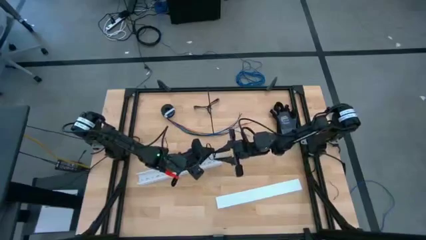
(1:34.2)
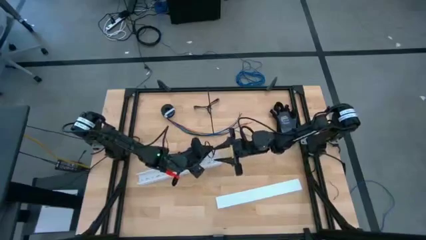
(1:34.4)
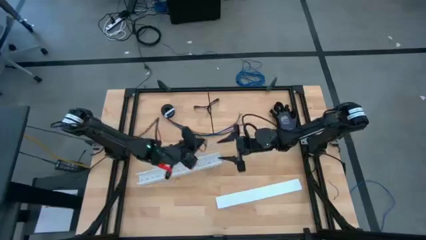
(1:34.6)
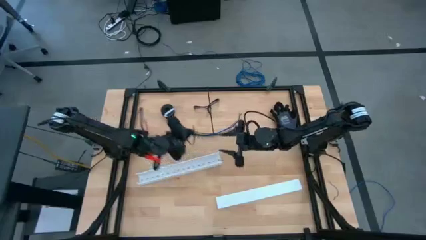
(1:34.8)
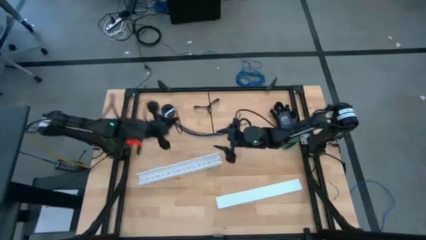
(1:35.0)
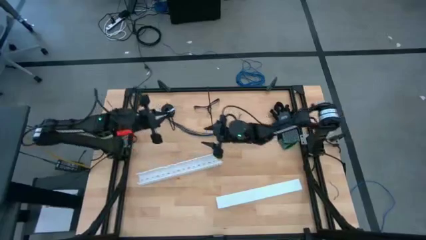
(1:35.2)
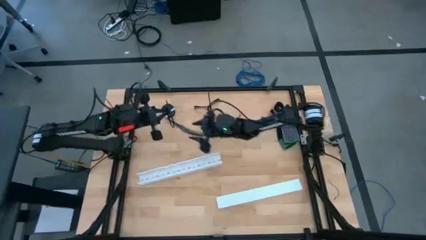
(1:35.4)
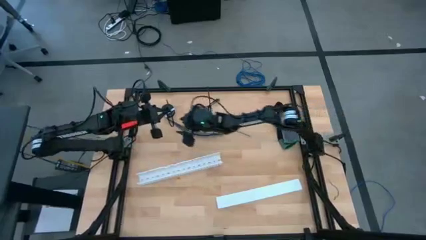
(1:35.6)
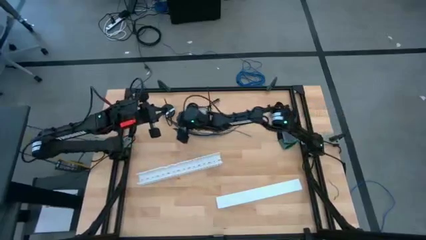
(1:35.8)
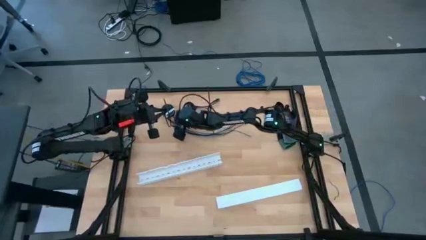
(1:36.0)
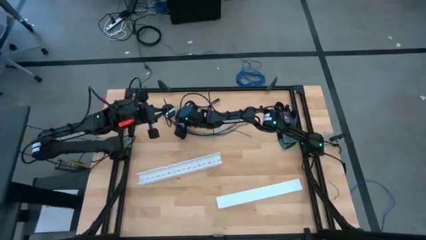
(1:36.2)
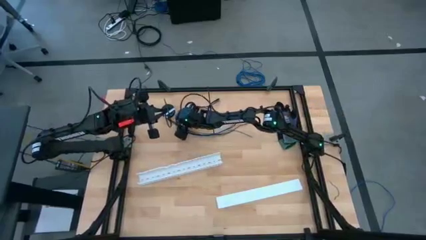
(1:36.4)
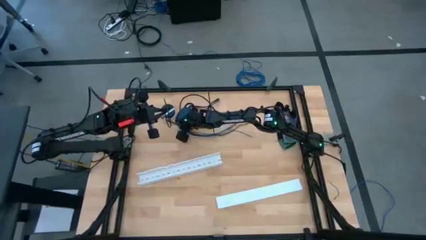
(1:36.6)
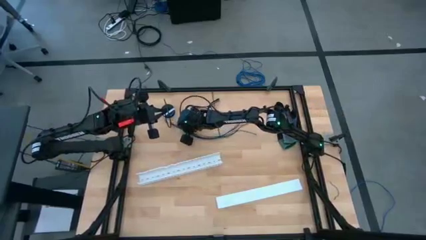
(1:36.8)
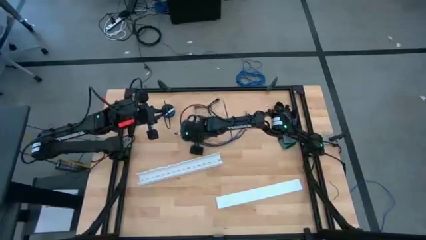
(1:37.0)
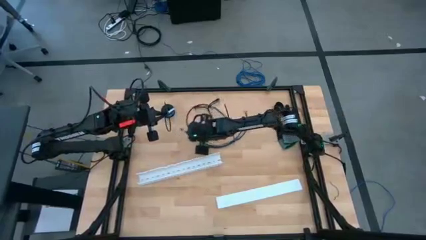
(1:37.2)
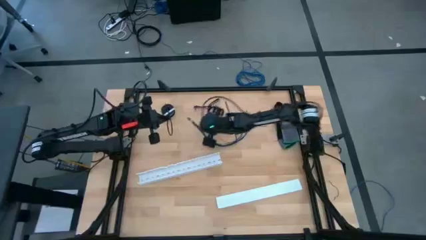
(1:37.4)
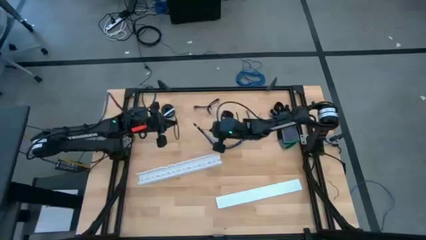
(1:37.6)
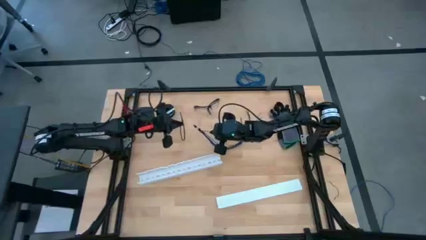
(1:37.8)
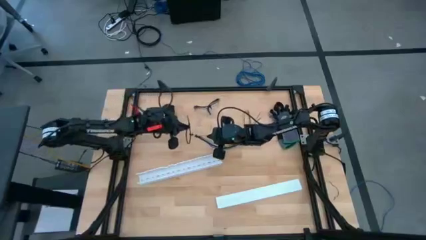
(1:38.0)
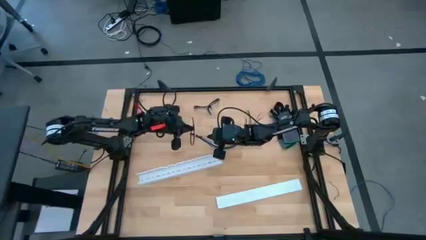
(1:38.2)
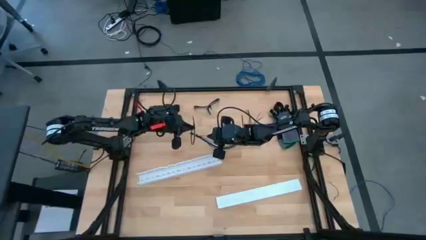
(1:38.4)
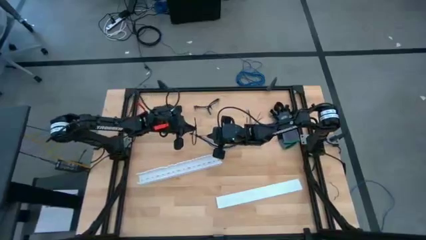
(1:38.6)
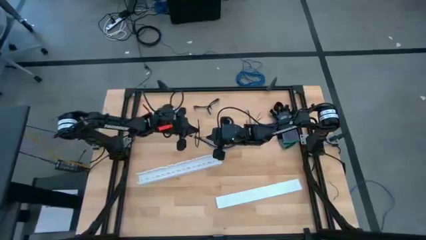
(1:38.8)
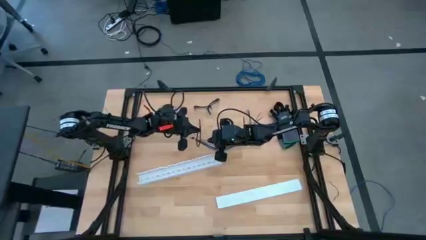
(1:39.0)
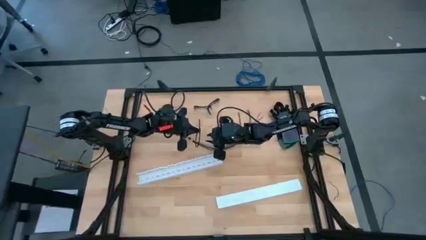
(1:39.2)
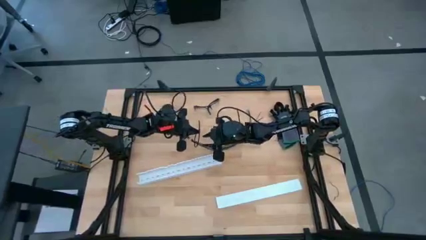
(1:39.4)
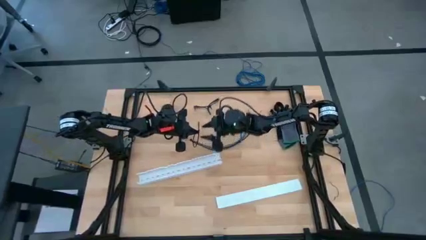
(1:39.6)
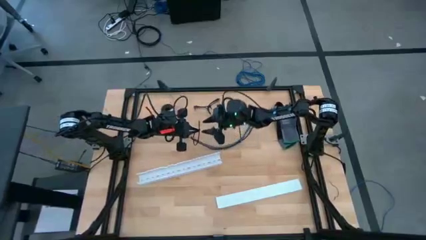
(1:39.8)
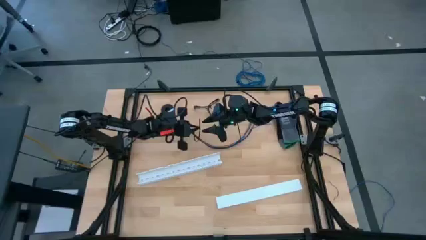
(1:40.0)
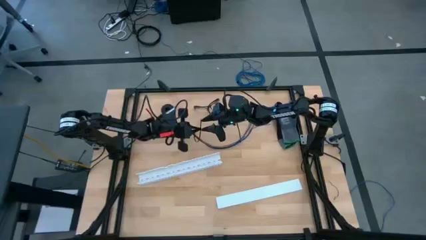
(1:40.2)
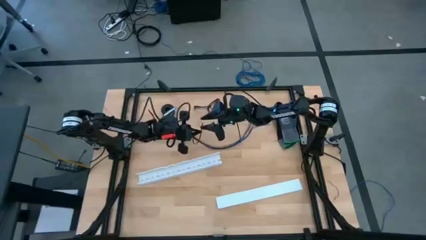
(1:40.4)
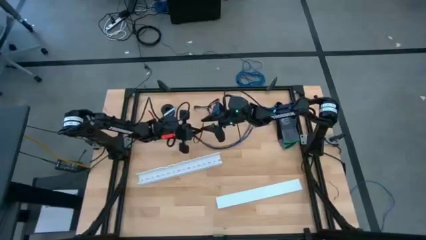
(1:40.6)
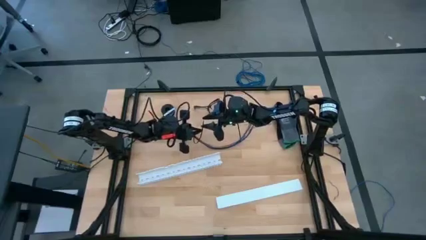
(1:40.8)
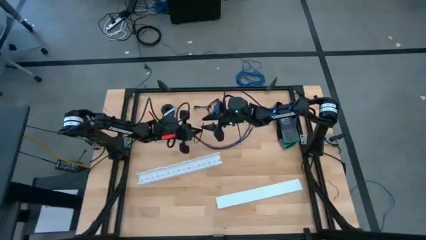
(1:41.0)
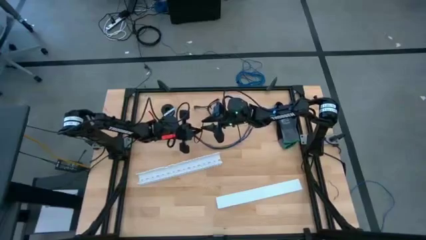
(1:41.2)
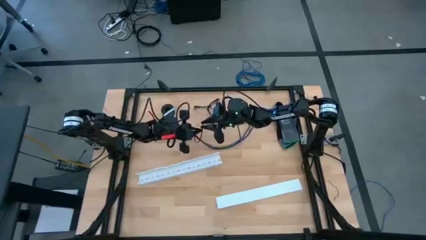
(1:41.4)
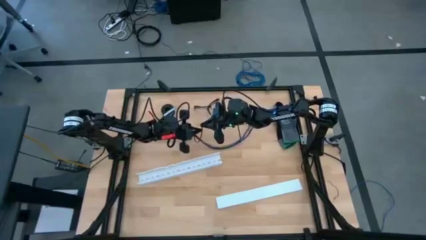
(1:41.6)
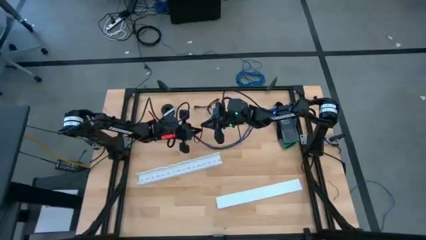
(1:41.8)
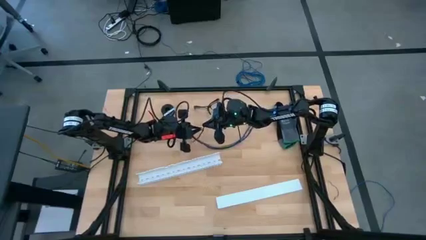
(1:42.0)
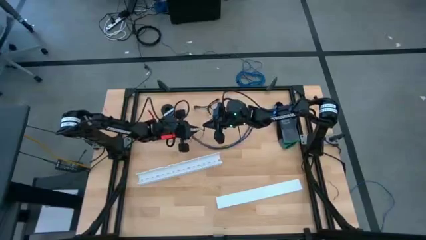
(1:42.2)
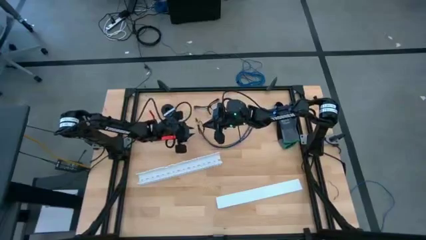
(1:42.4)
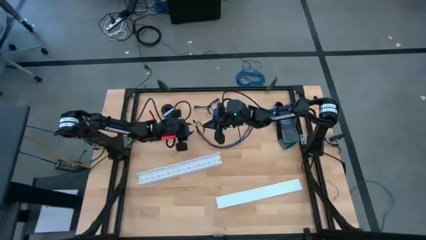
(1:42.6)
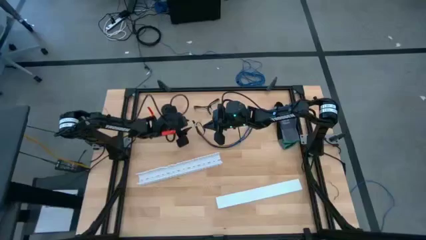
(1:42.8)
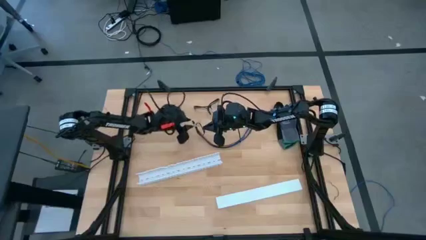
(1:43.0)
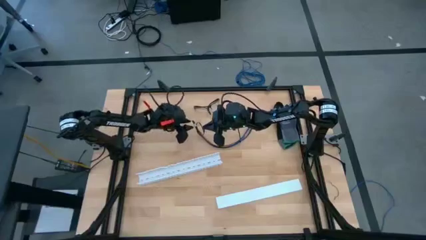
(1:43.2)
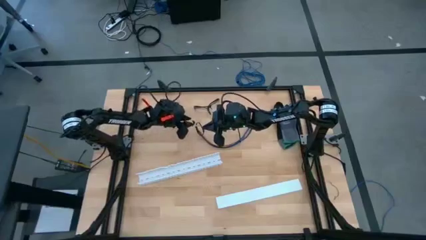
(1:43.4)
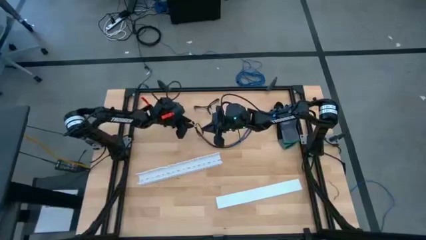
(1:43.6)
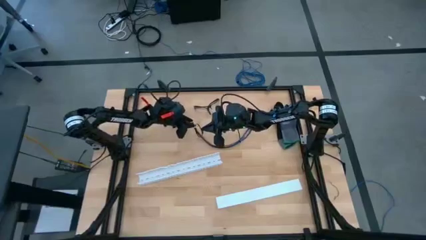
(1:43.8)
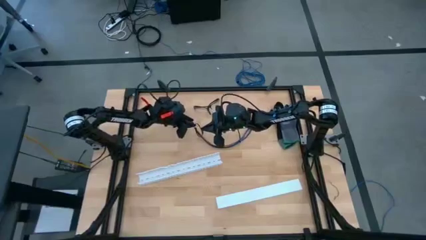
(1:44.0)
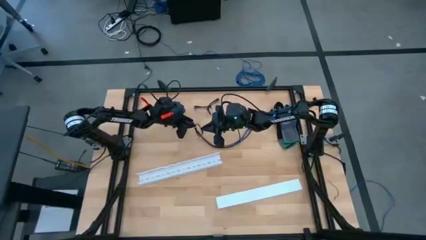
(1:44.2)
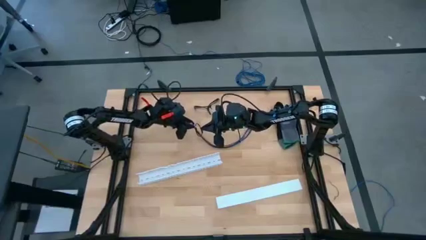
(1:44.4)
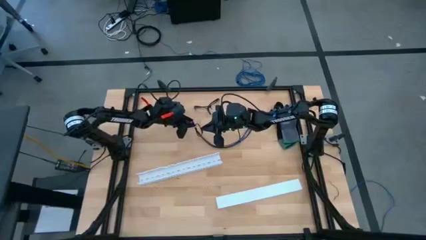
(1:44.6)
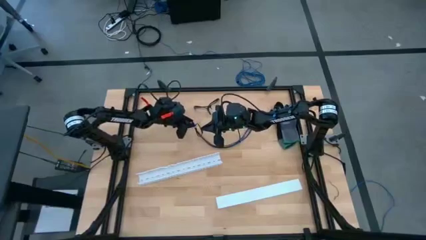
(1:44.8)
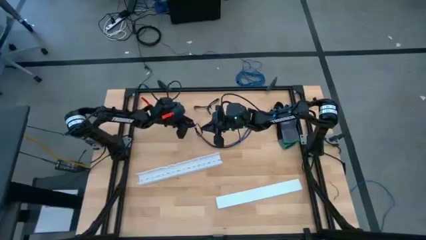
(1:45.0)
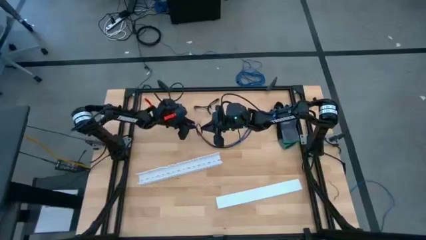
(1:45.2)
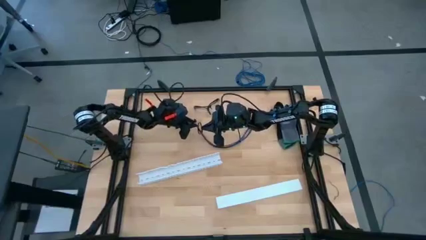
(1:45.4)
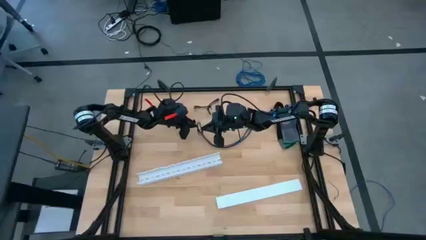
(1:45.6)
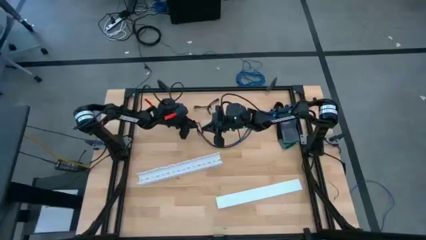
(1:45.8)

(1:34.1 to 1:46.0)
Task: Ziptie cables
Wrap the cable wires with the black zip tie

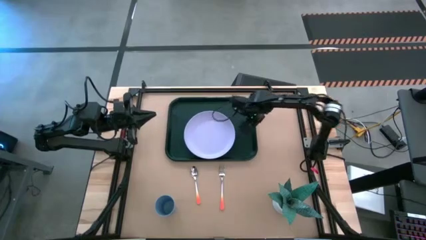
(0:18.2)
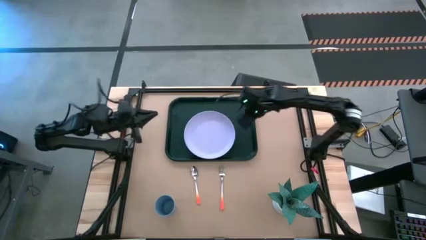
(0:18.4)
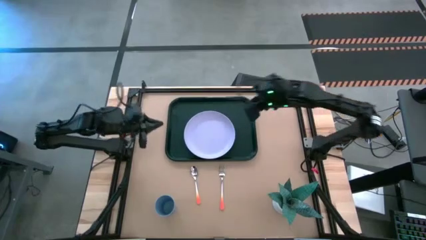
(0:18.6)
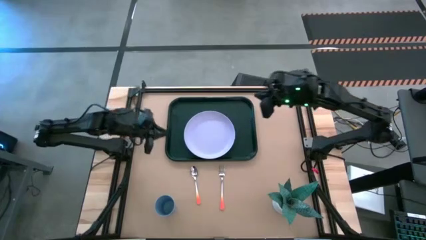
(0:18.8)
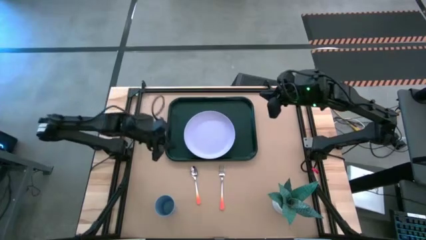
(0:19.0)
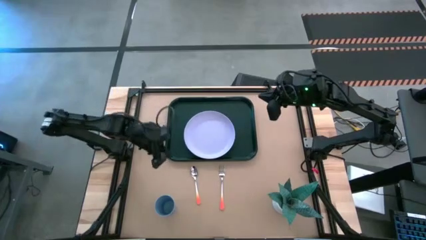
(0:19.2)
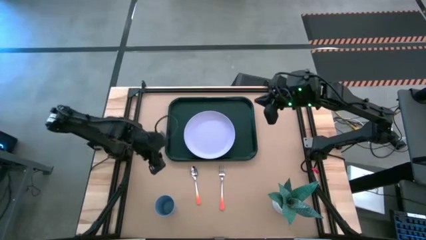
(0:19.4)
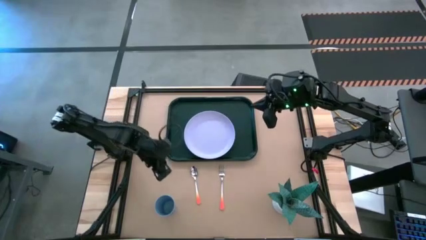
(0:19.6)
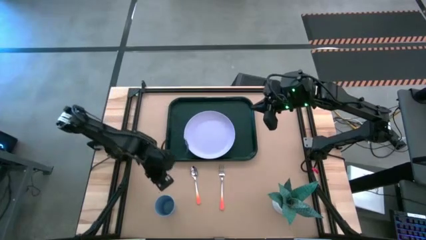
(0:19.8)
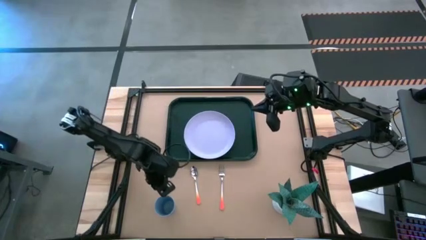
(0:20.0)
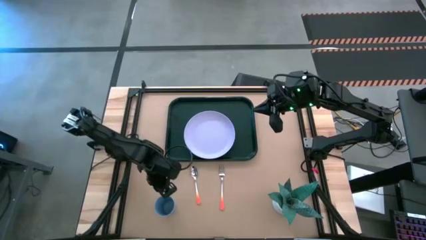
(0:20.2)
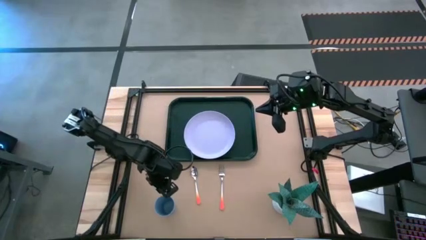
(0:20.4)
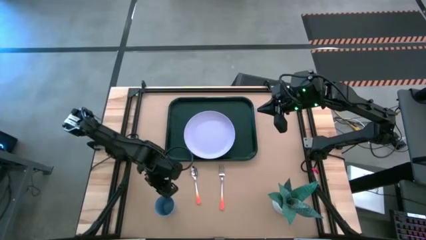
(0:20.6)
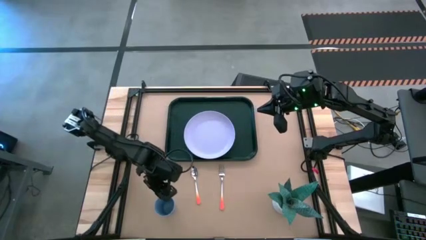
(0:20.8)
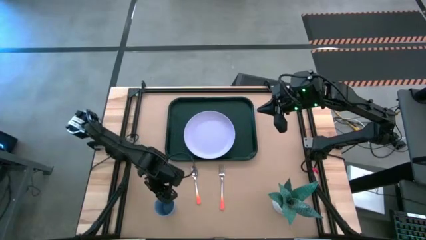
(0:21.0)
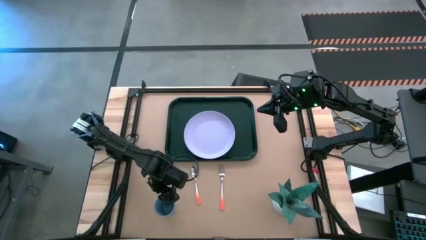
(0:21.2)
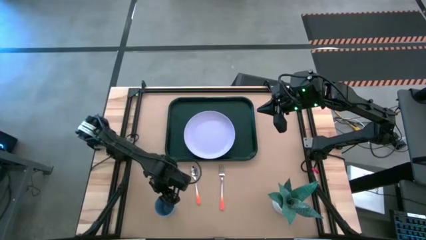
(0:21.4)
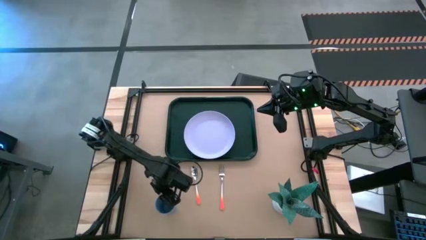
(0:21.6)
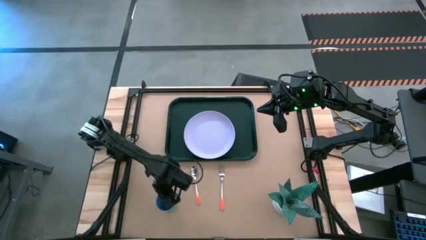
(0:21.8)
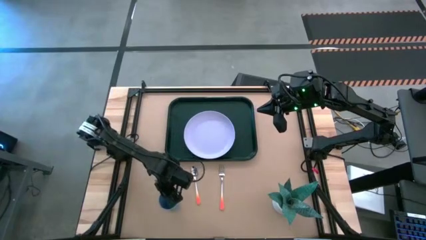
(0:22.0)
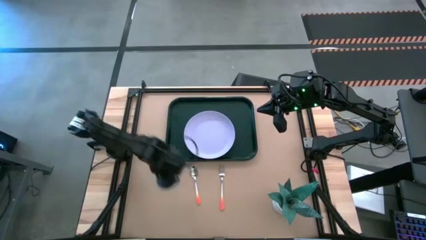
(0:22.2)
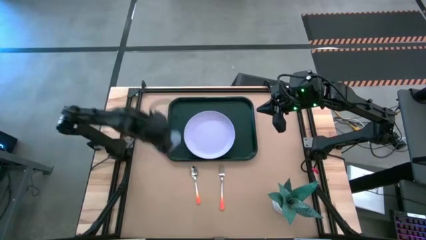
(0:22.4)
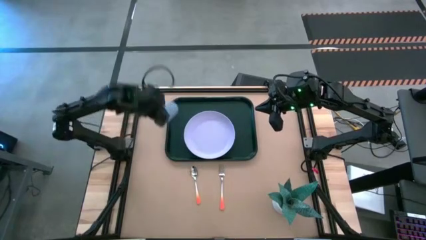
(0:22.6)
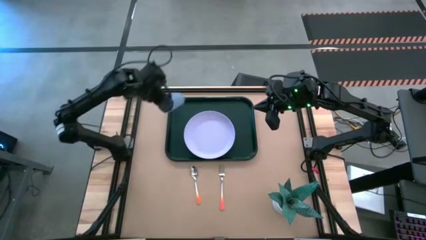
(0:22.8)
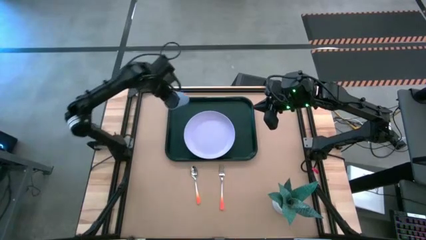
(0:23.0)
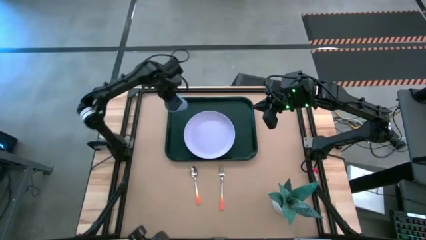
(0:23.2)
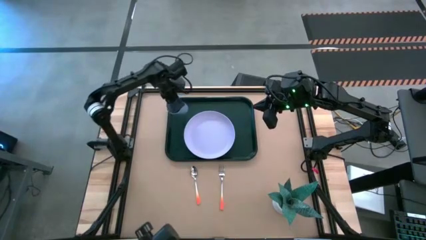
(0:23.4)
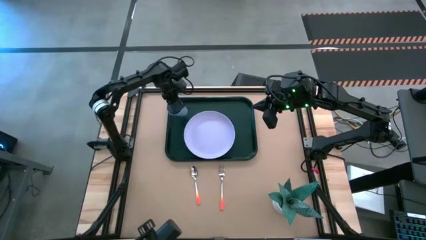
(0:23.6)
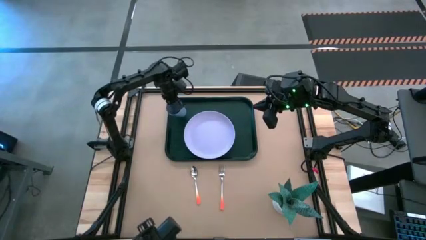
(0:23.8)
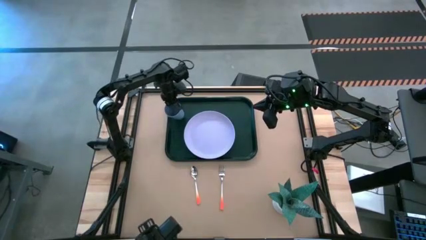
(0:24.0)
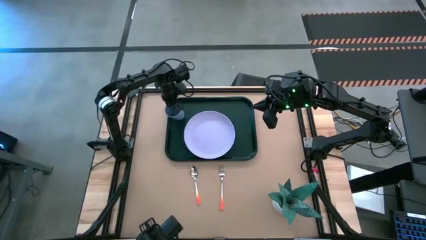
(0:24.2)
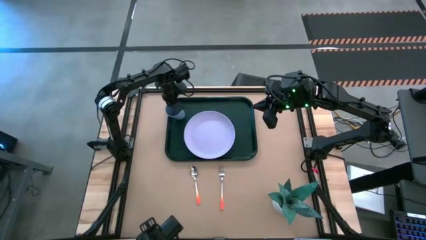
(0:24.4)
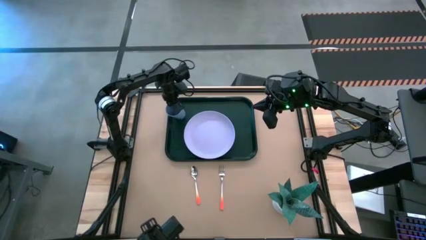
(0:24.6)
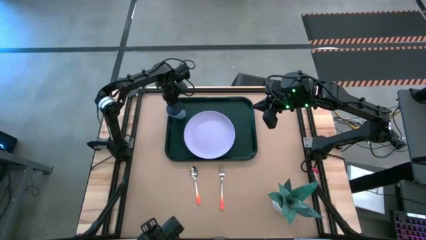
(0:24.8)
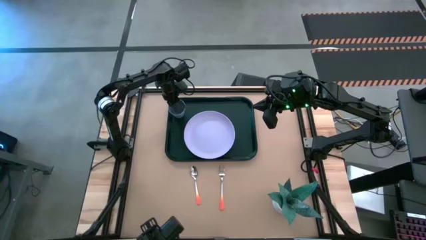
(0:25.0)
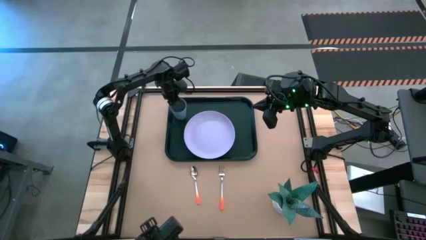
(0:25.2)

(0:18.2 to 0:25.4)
Task: Pick and place plate/cup/fork/spoon on tray
Put the blue cup on the black serving tray to the top left of the white plate
